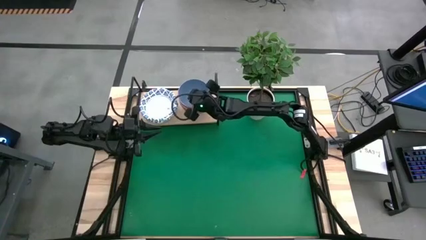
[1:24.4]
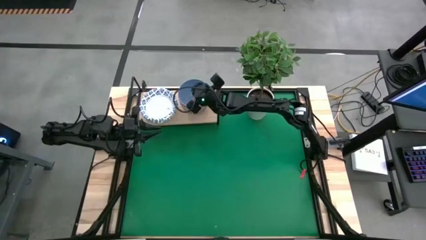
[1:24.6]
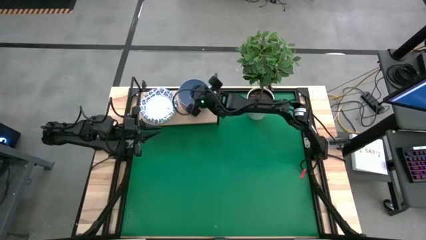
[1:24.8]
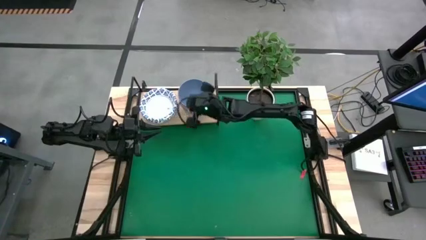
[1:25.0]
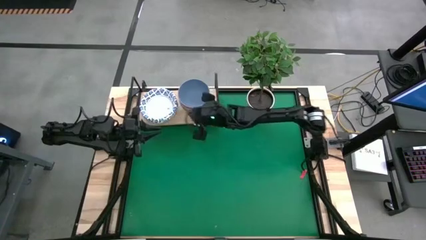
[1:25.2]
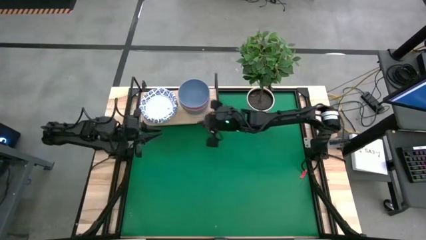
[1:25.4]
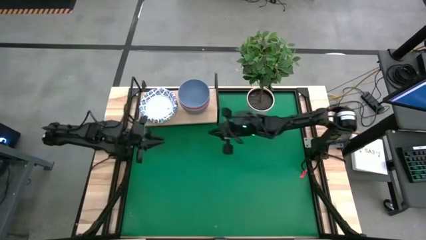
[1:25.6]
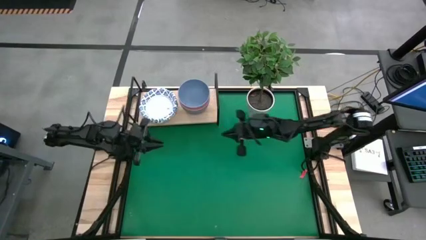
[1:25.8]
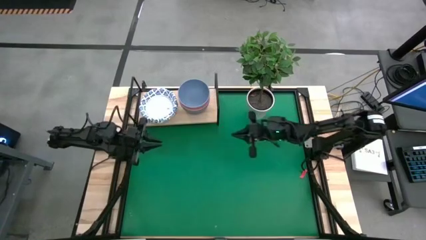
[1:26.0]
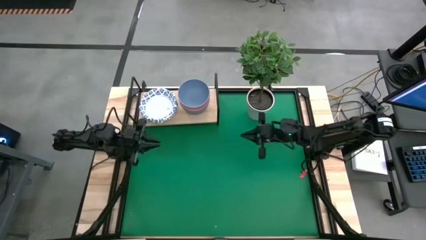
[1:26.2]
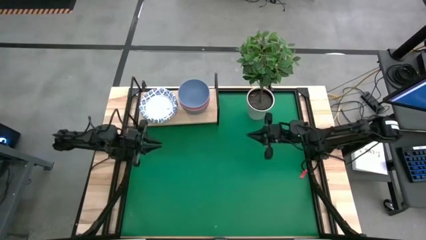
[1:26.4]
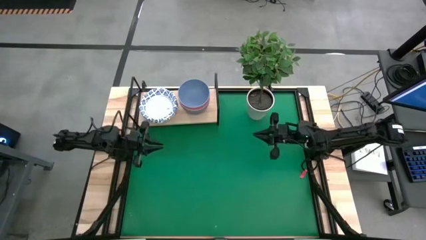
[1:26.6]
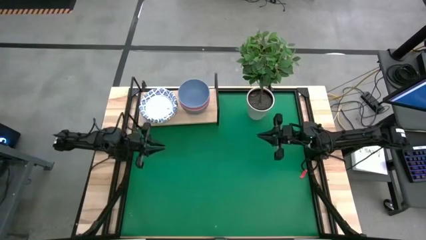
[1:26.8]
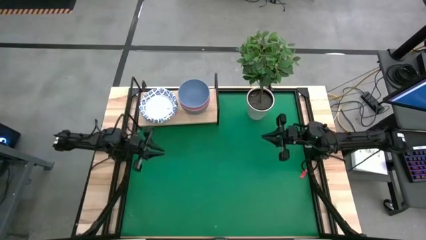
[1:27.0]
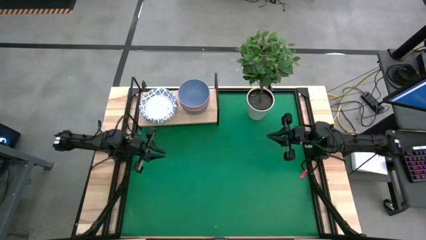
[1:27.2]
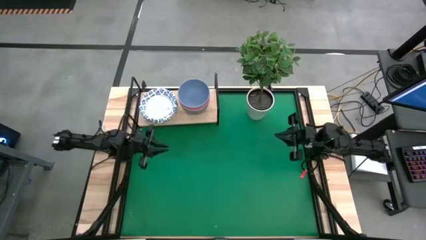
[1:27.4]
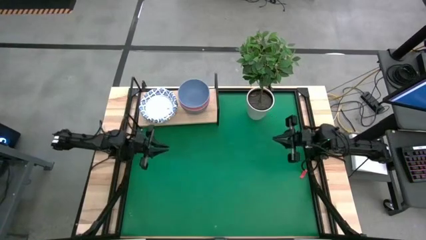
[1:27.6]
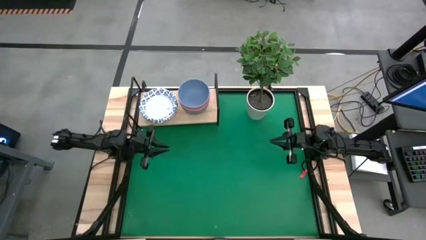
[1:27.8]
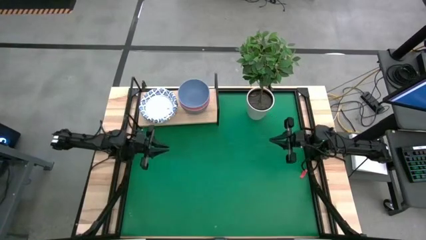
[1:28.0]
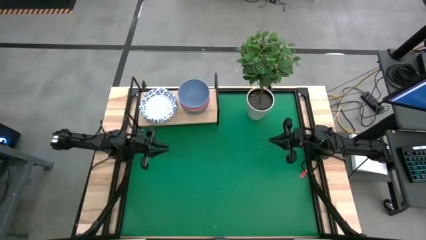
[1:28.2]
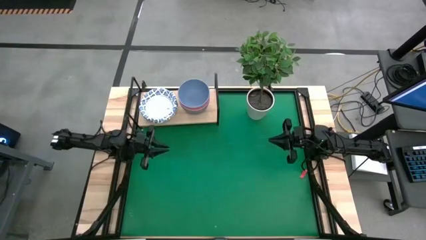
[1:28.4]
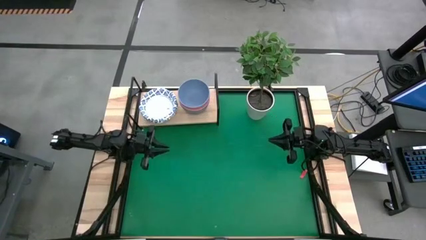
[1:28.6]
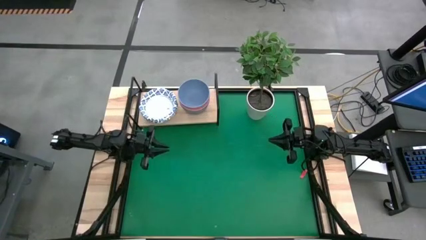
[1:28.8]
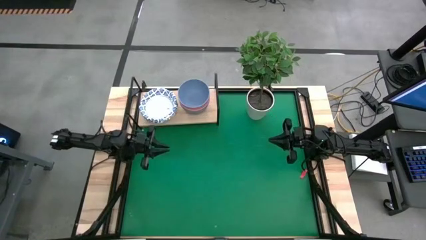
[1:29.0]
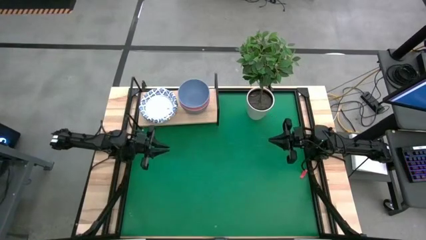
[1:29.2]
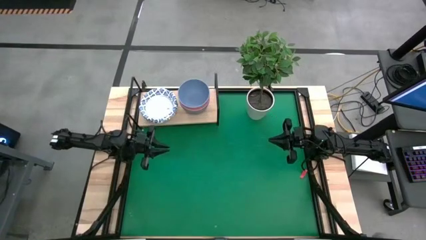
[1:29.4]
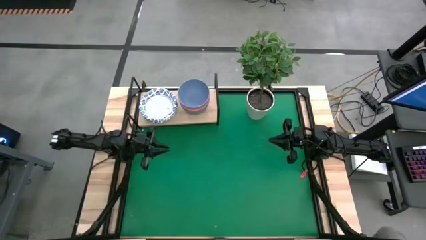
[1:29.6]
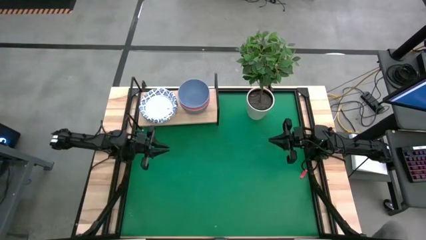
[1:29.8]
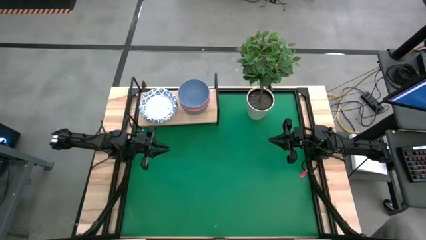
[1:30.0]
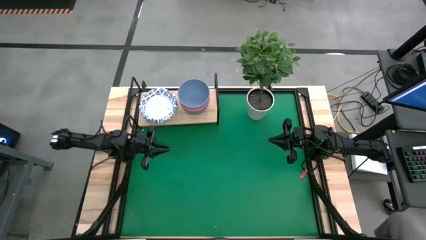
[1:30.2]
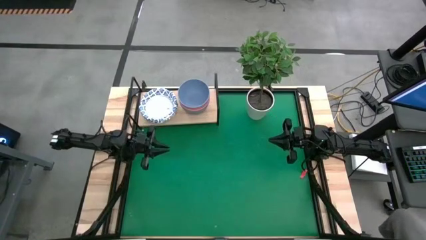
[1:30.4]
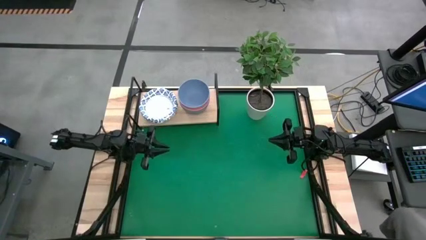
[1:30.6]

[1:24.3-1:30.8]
Task: Place and stack bowls onto a shelf
Return to Home Position

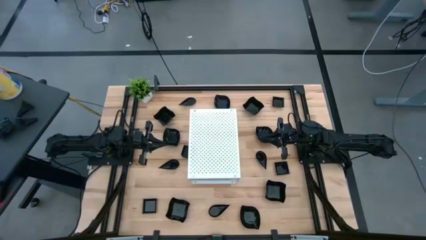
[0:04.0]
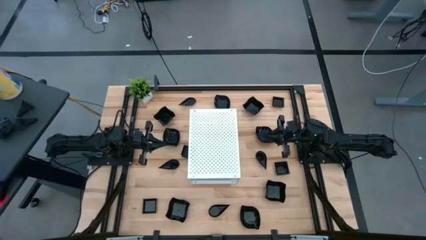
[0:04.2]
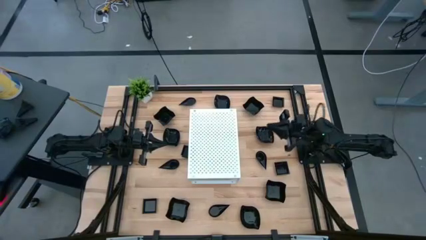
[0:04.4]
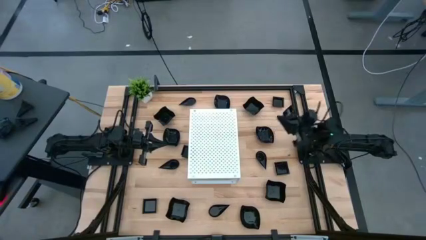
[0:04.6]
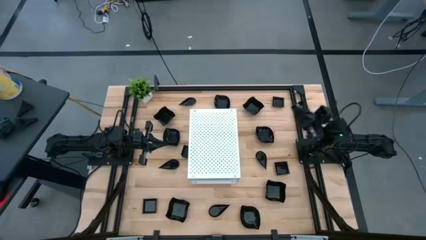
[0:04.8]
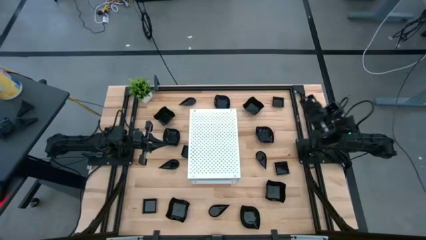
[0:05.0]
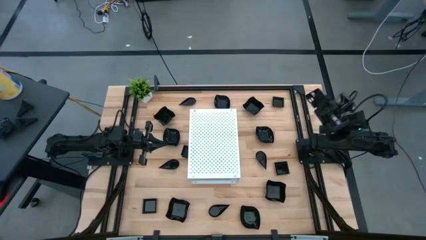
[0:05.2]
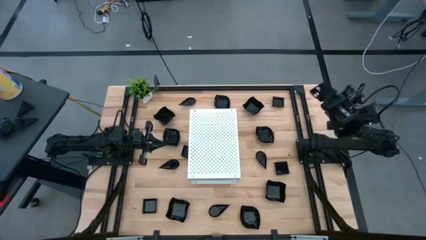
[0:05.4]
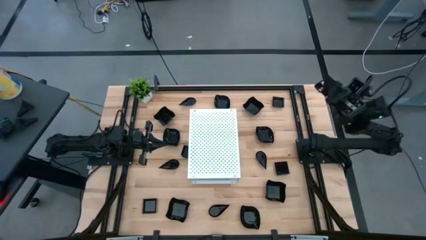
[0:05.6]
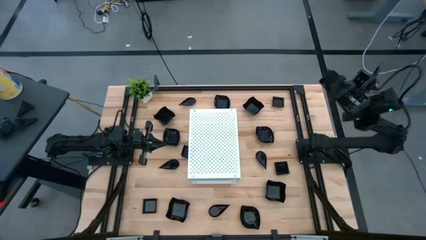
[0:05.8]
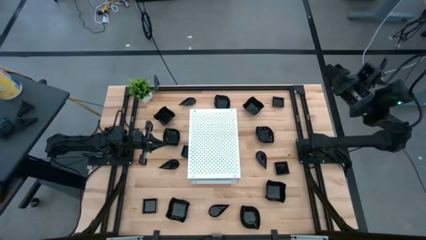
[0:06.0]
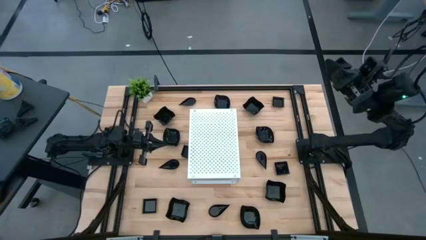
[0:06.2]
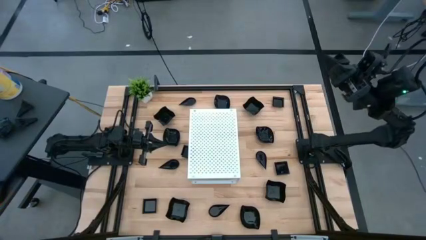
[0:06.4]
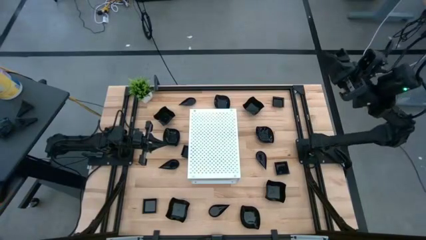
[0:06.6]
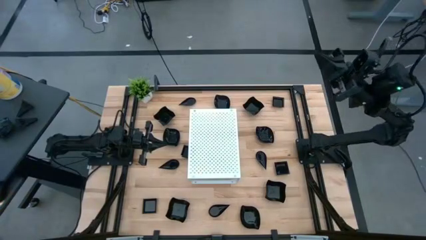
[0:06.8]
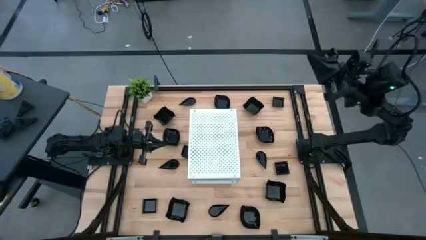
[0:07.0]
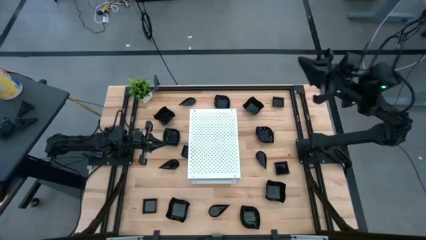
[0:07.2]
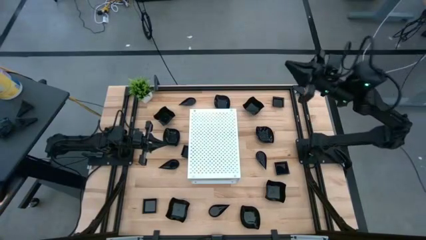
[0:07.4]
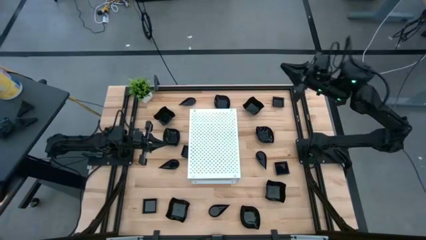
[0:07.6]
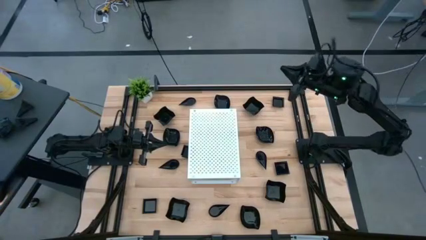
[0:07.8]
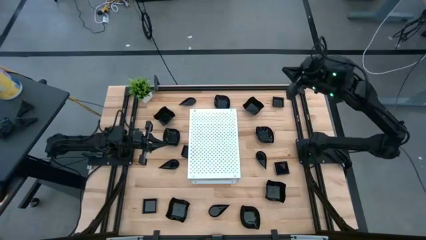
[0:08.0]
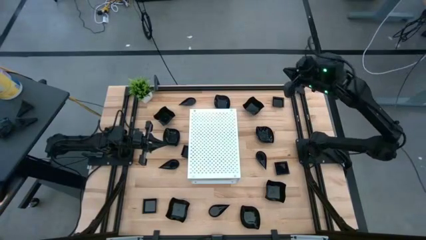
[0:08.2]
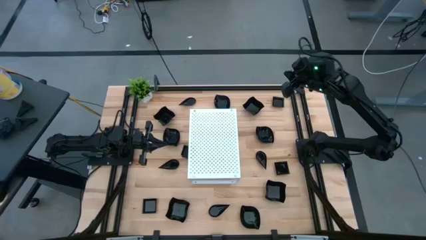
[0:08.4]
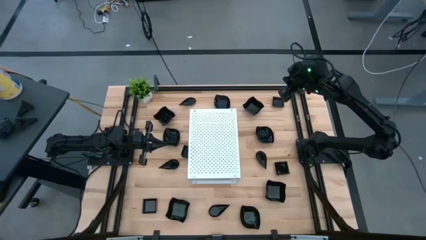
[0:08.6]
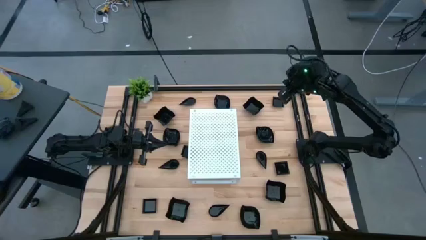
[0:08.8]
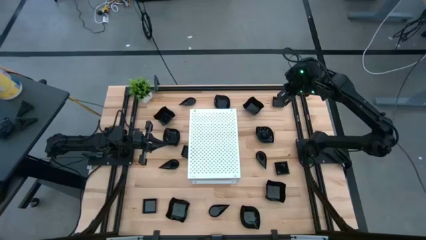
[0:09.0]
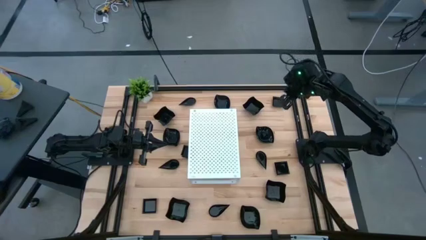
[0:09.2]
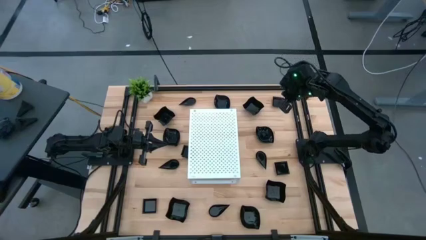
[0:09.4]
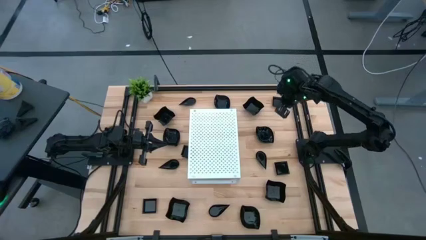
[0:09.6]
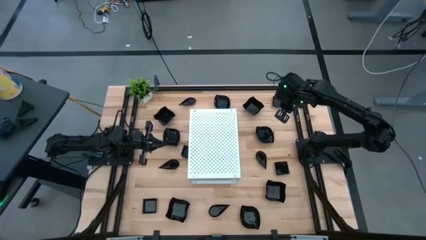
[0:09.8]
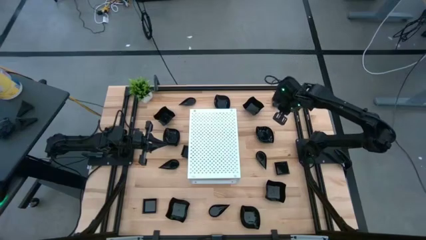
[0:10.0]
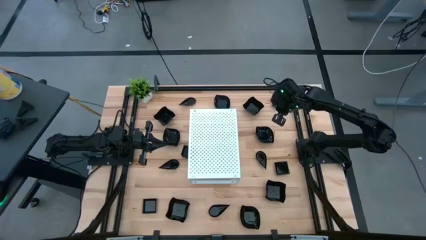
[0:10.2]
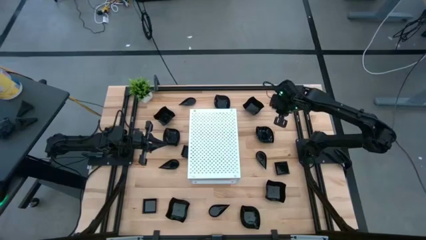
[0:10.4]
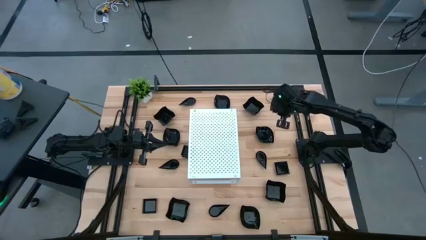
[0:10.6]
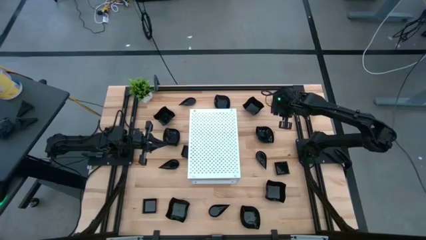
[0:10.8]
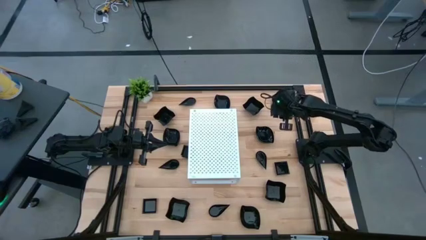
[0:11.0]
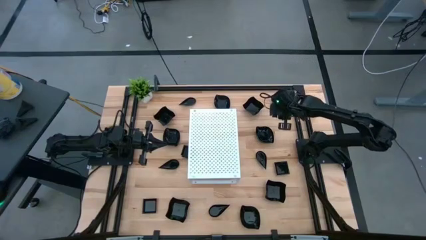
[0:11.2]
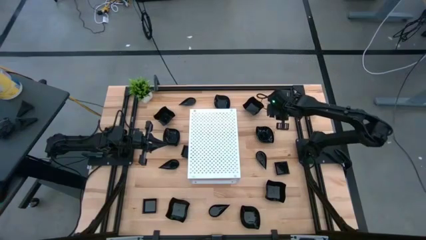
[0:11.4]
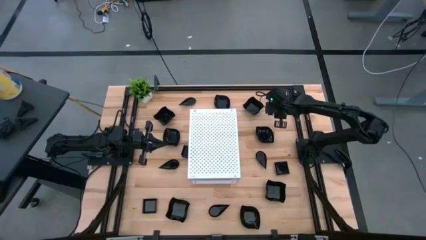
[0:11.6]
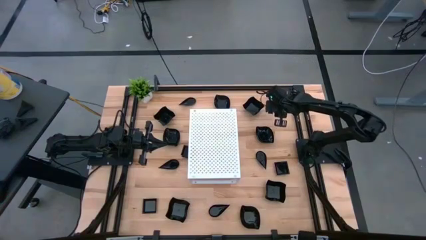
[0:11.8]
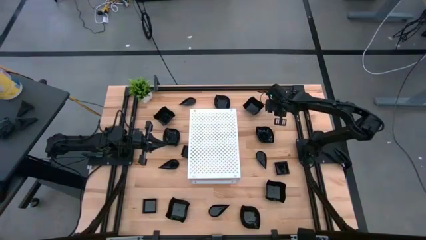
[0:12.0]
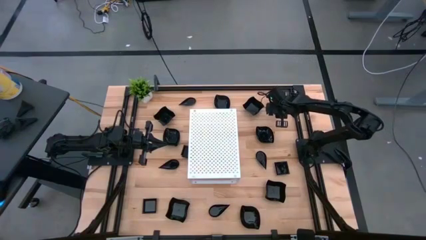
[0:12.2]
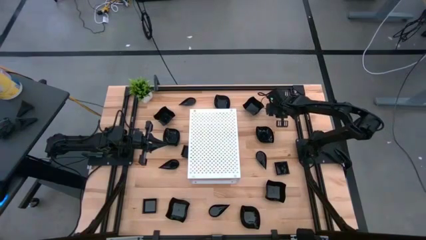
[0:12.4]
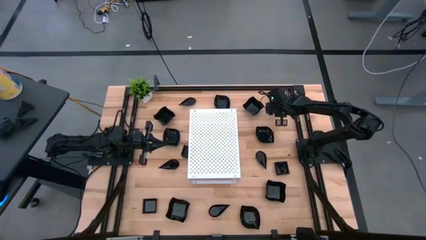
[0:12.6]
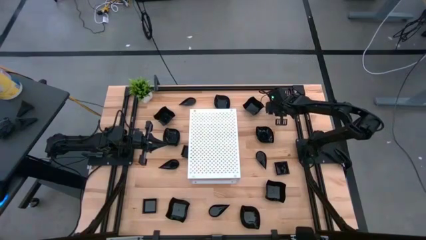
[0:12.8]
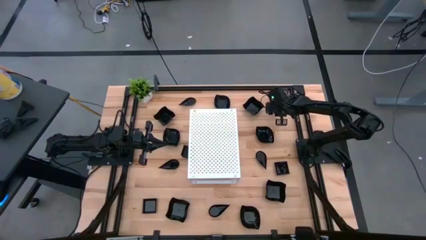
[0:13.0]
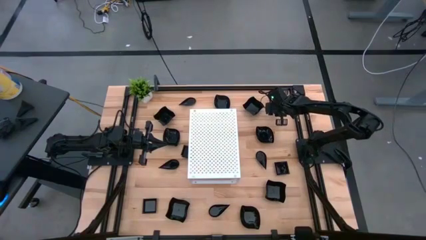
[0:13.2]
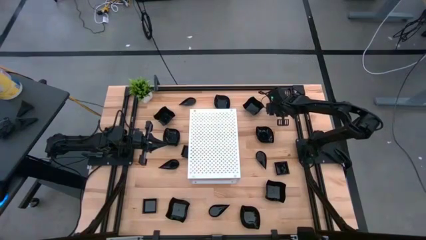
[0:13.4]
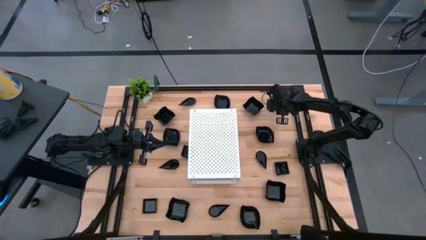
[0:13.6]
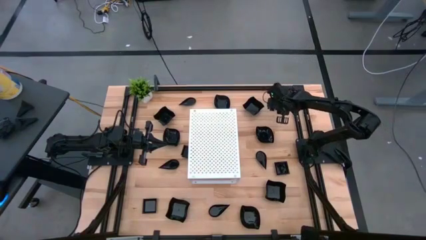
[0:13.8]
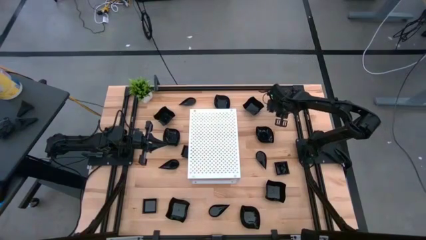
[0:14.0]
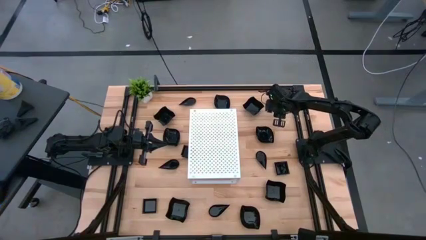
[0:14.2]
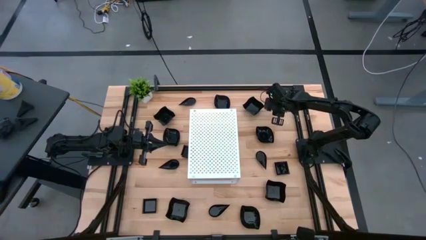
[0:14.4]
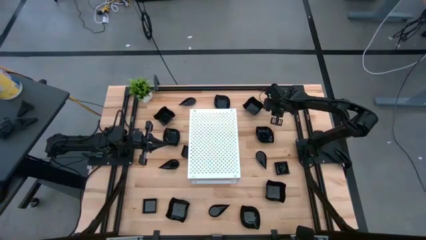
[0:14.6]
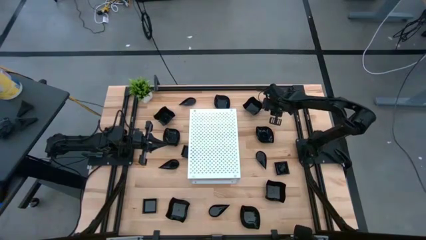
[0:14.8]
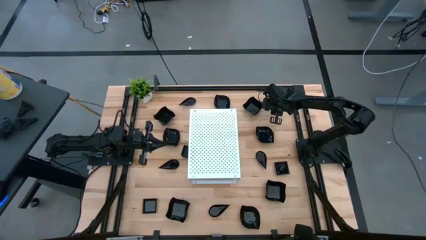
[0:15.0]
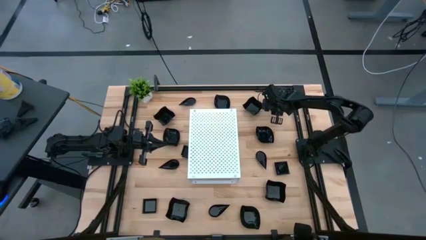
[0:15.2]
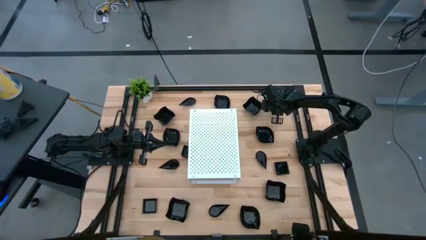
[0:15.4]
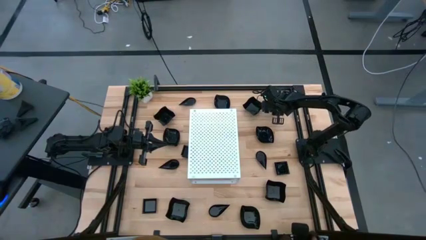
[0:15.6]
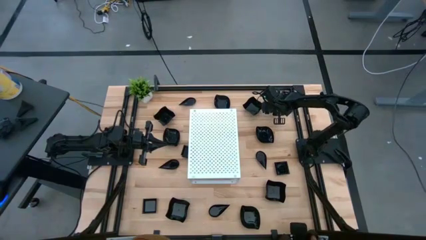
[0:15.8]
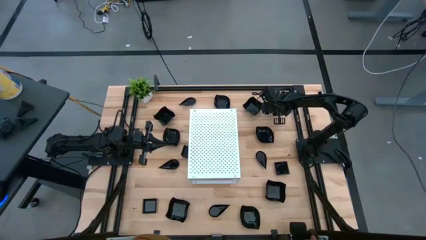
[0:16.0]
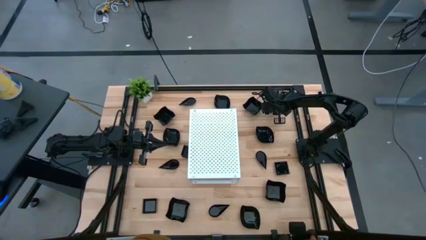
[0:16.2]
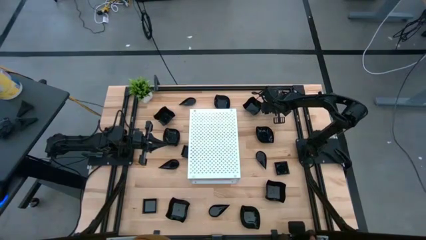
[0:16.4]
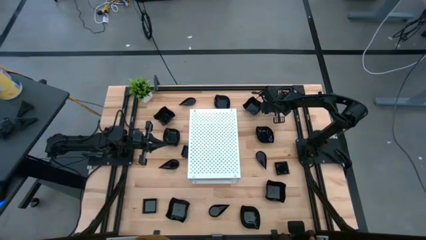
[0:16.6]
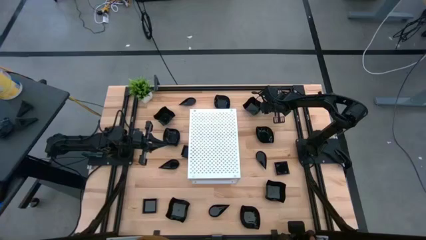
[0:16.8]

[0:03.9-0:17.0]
Task: Pick & Place Mini shaped plates
Put the black square plate on the shelf
